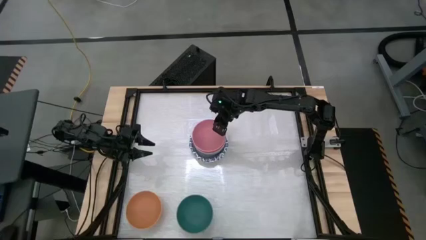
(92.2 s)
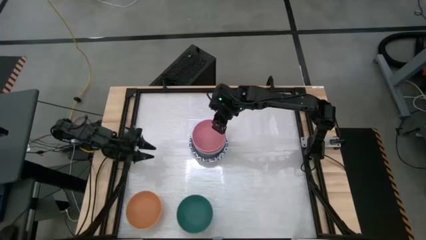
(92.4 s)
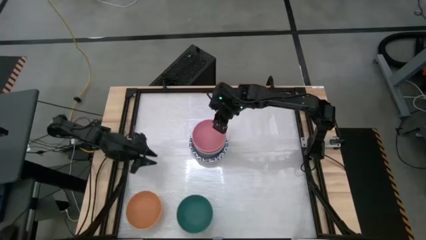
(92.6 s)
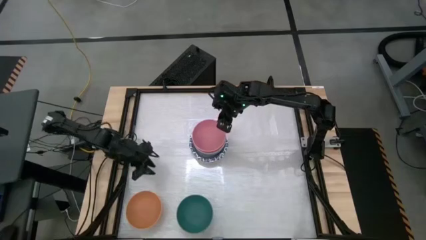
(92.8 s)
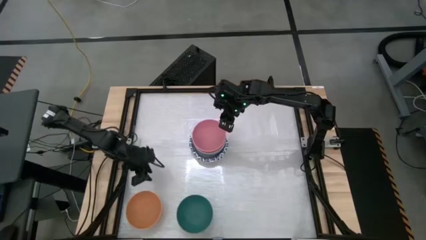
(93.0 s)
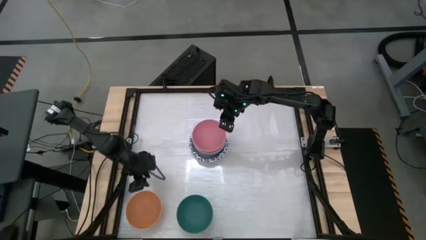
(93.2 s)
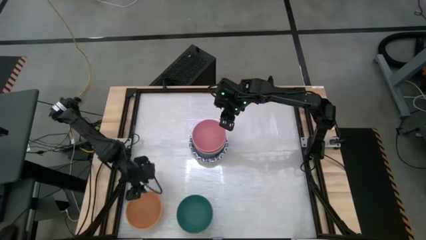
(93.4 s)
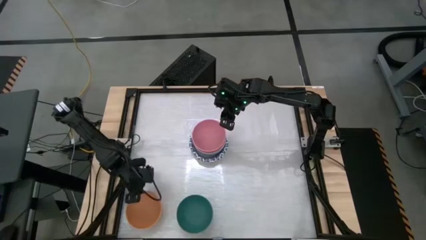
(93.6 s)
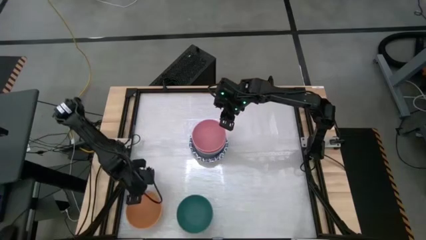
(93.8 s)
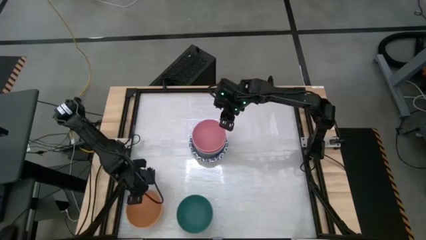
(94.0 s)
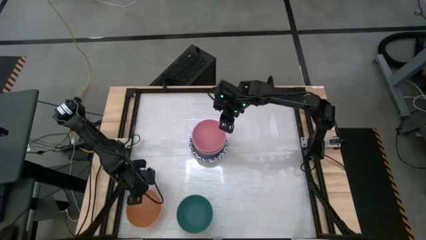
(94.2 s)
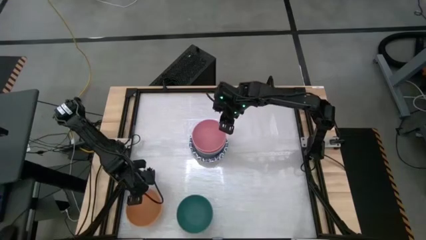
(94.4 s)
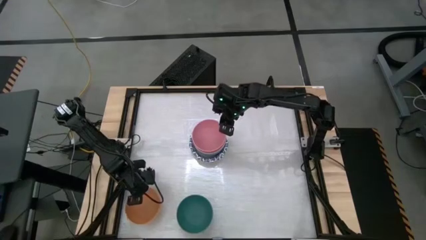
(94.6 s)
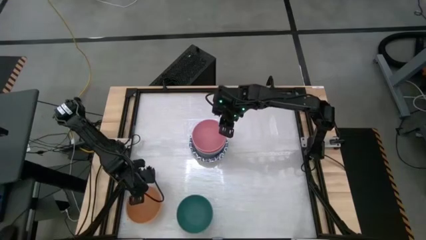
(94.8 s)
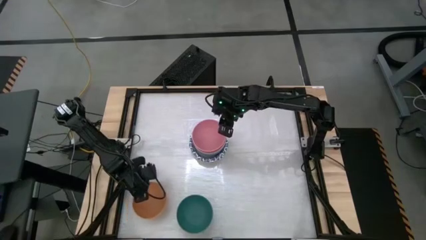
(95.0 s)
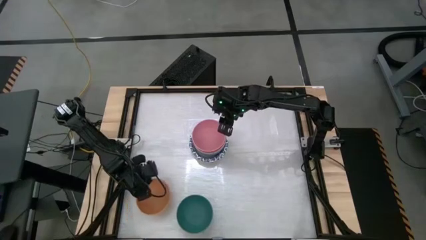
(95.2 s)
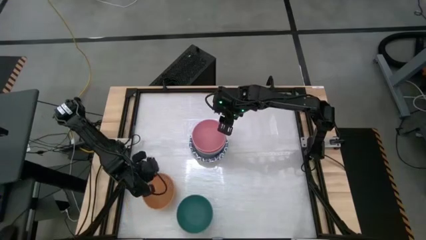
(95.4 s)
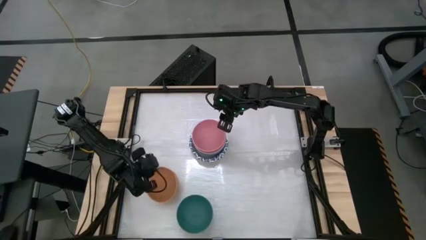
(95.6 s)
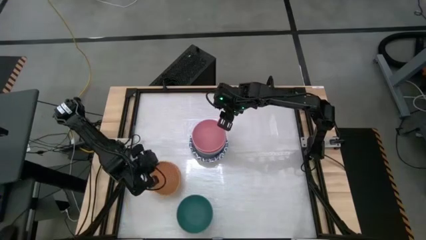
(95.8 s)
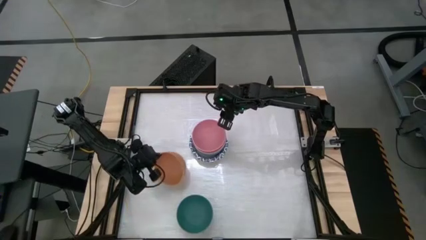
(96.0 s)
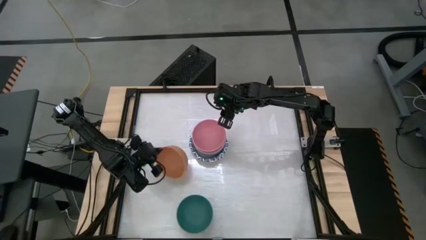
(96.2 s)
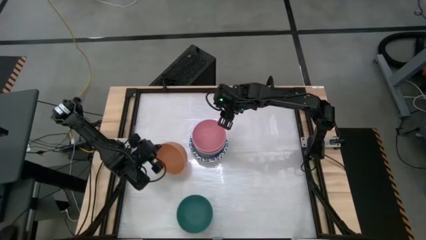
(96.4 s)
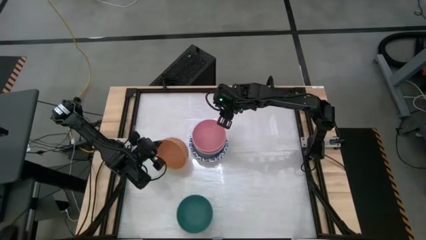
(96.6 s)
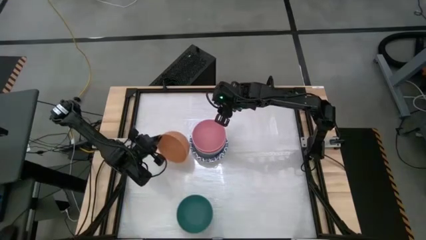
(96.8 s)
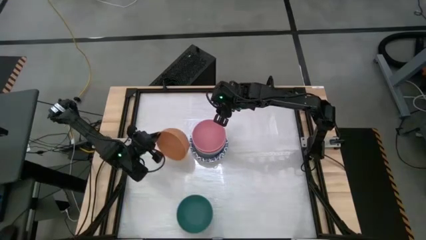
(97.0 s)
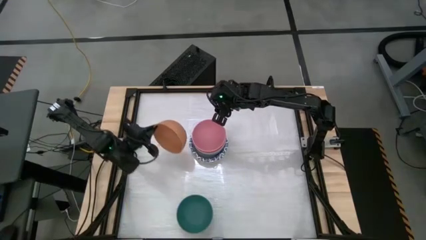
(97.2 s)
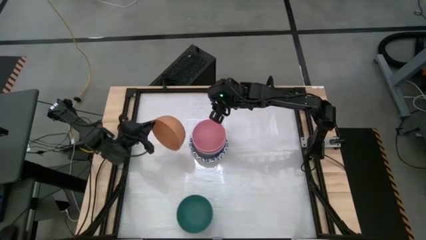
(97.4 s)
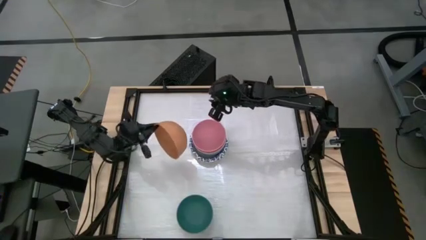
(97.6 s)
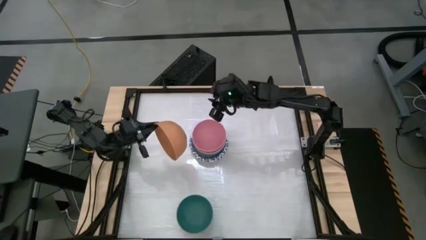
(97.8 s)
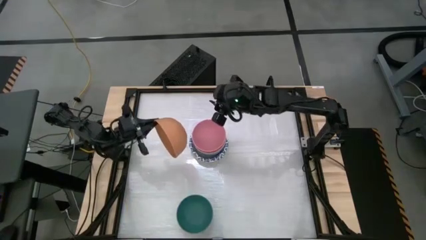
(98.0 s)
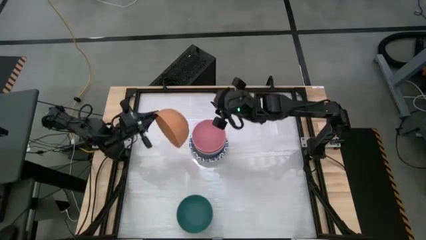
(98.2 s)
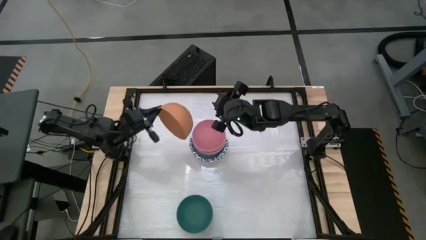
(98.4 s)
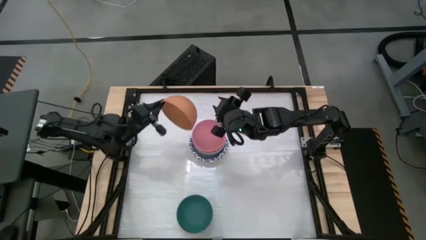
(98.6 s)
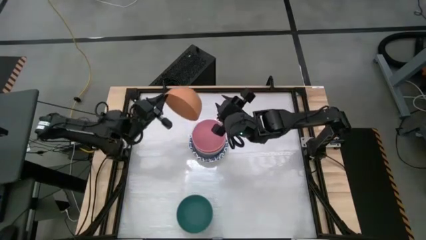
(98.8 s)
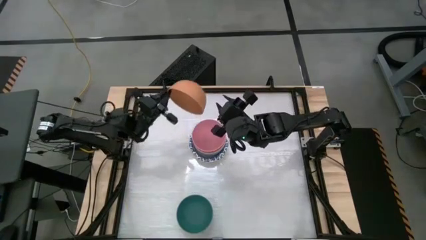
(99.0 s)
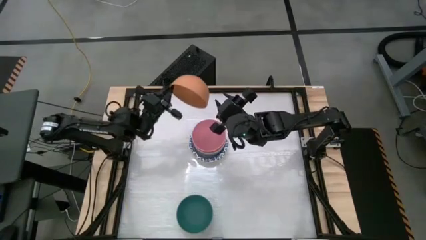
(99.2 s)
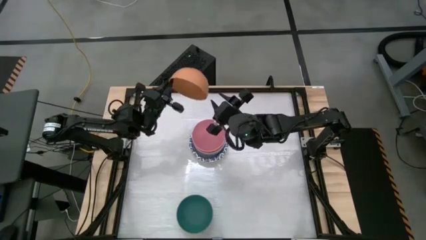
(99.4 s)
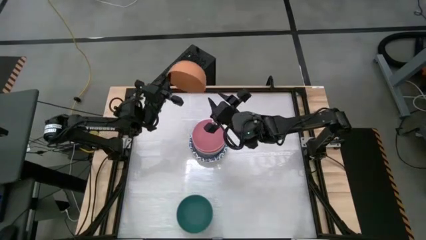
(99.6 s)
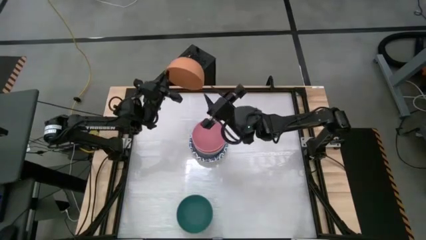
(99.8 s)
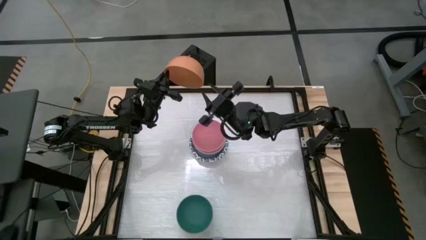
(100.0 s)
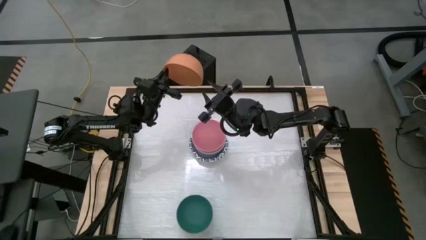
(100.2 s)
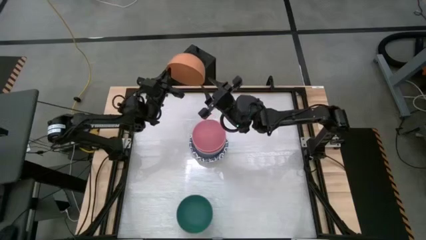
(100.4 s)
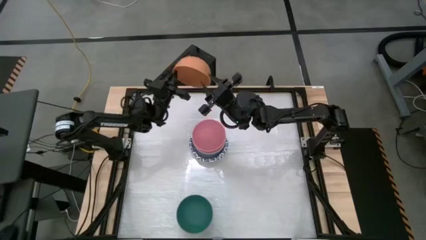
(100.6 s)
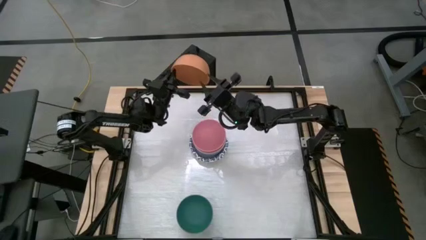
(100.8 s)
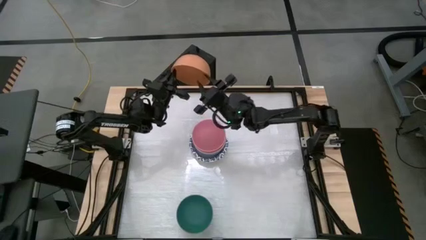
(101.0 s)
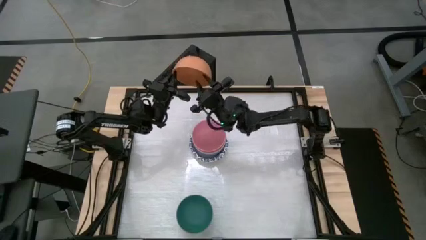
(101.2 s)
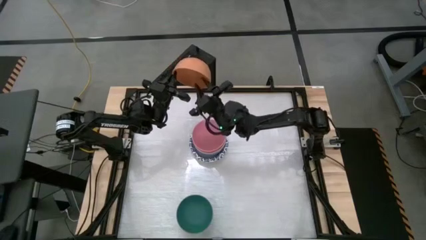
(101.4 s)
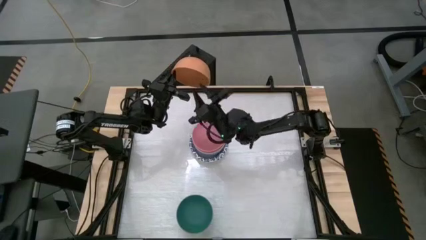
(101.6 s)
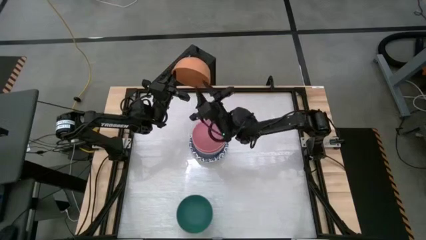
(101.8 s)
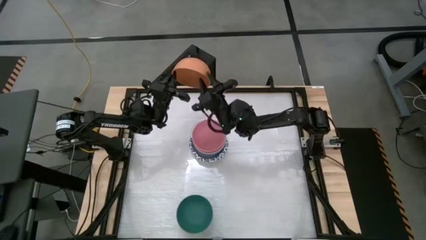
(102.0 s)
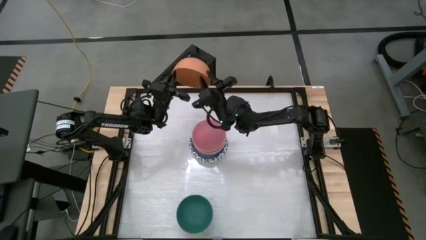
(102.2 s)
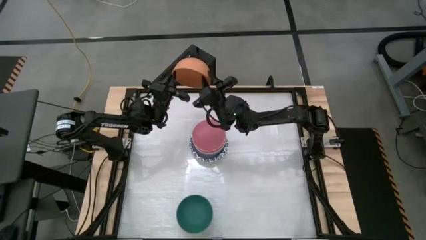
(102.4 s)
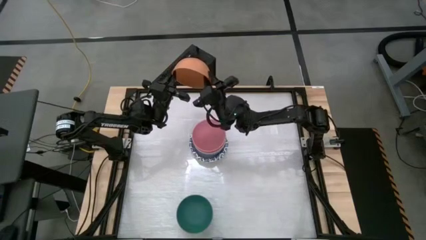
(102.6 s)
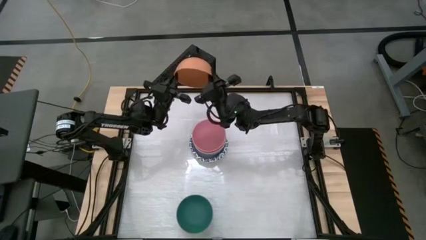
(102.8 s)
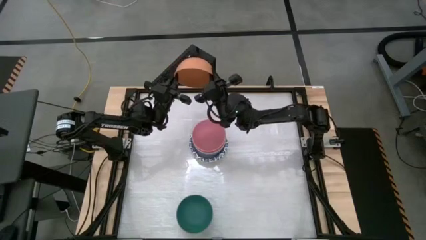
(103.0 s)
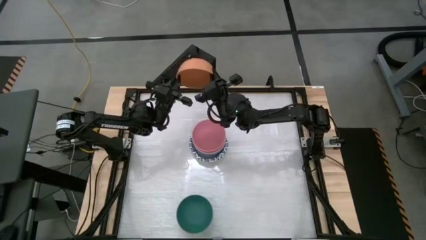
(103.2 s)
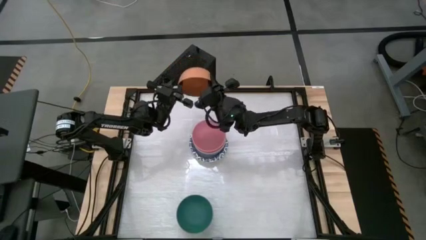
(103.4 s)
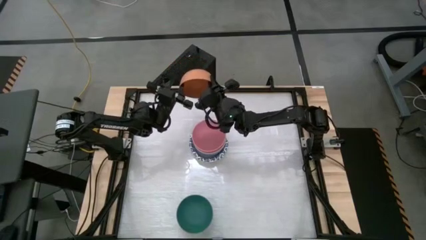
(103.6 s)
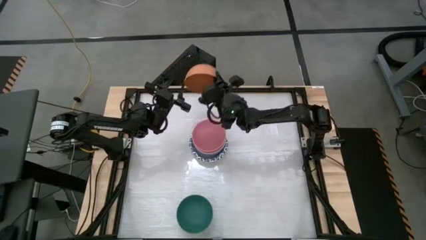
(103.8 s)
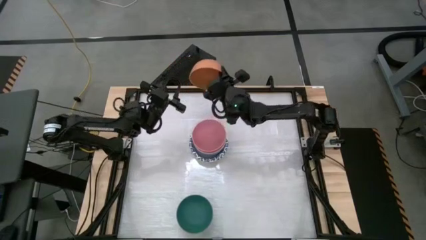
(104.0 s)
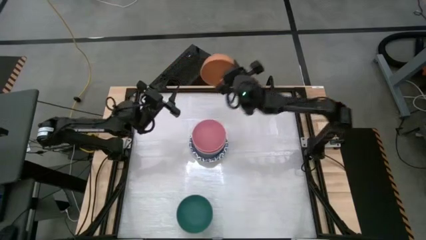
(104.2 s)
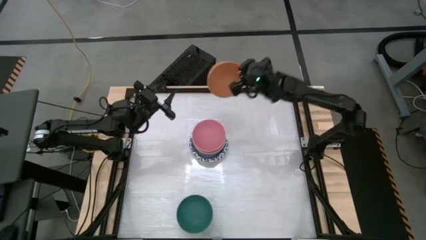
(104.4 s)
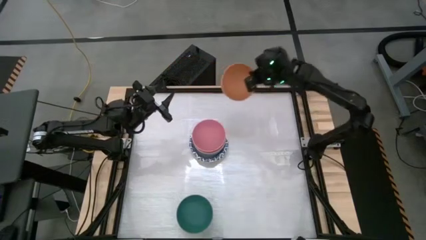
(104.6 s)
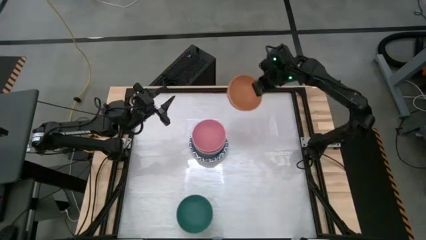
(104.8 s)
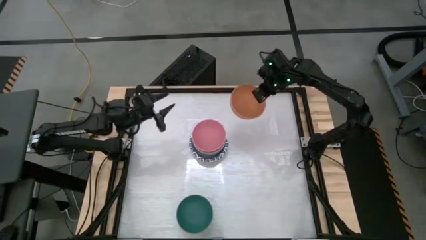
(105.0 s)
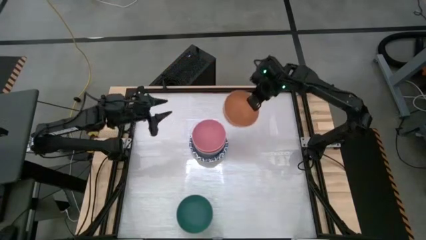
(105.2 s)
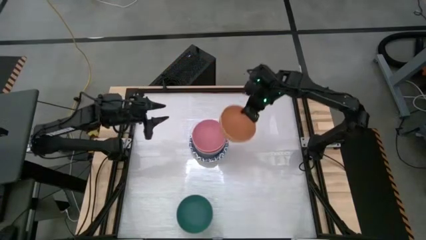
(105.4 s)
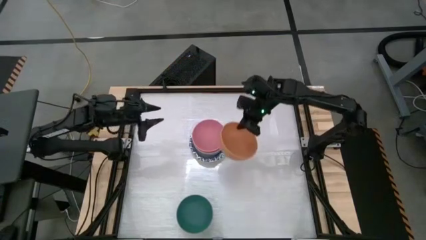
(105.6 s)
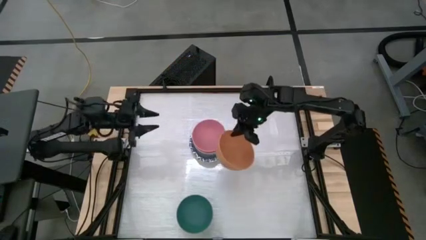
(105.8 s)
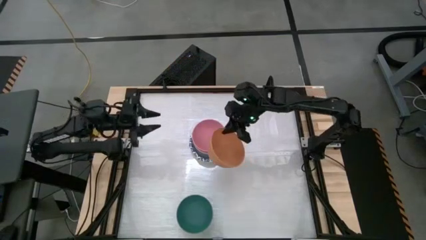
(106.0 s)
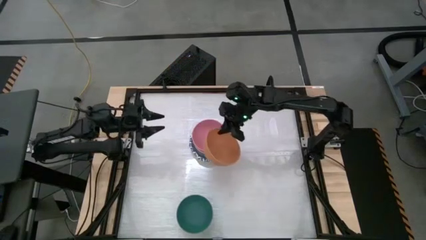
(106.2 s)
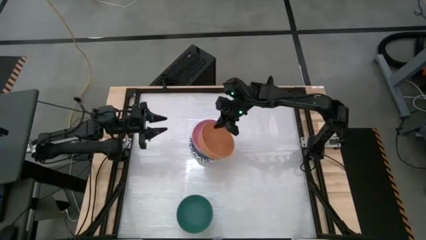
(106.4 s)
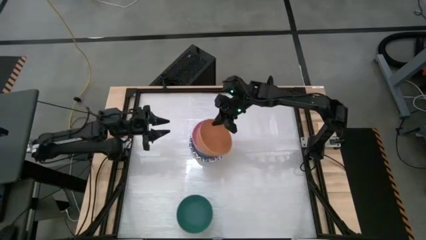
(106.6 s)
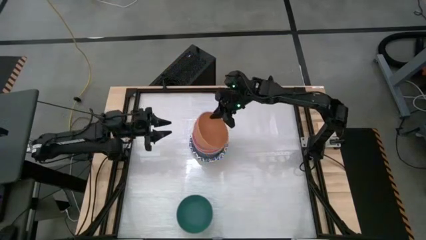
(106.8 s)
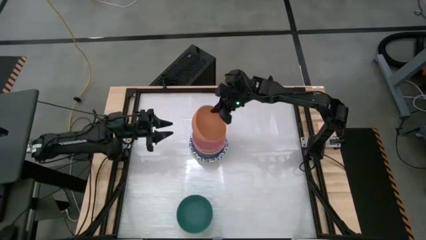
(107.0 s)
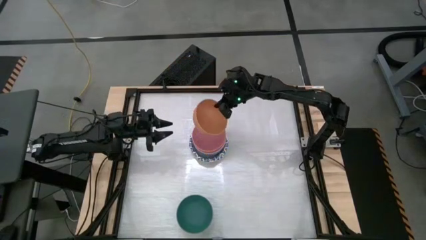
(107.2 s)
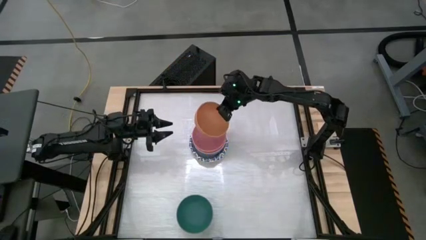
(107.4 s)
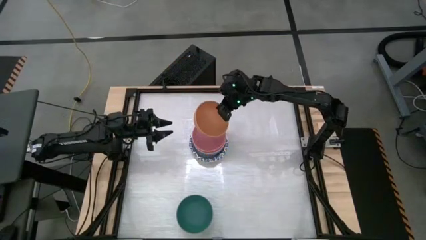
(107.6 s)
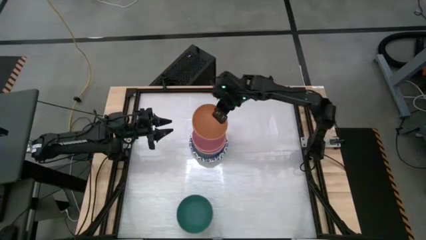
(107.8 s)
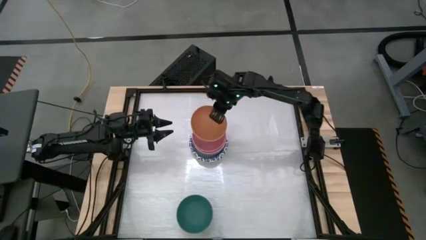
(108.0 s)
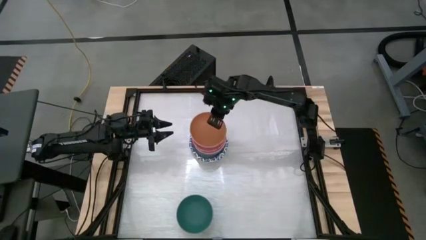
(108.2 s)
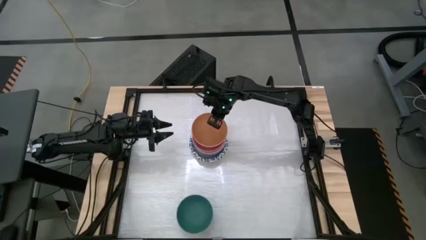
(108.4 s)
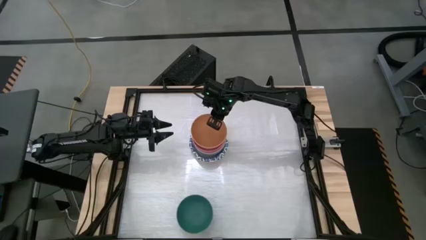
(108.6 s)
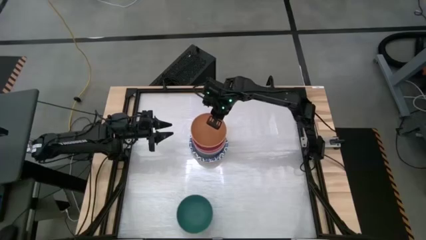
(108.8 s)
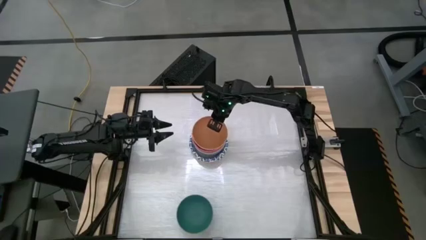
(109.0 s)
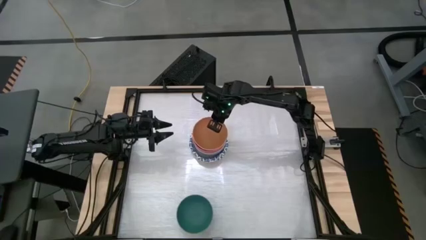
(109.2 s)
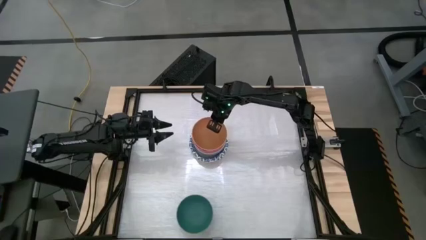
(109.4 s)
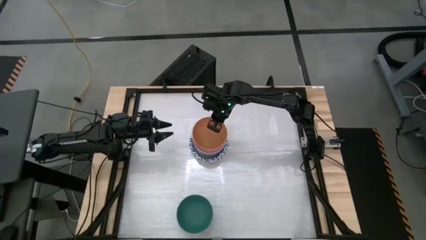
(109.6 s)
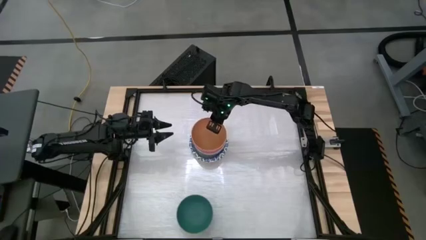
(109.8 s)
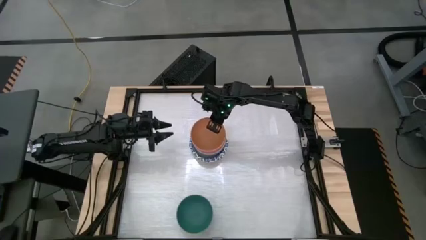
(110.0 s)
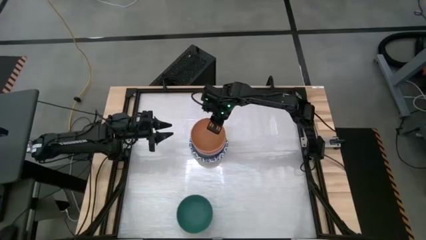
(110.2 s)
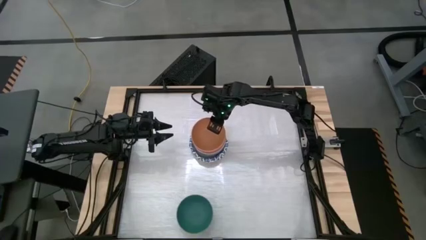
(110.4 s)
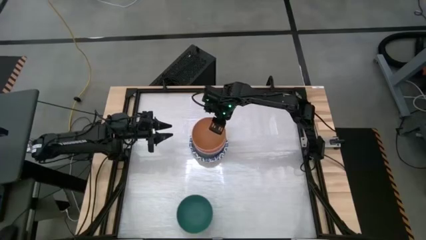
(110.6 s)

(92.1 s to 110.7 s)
Stack the yellow bowl on top of the pink bowl
